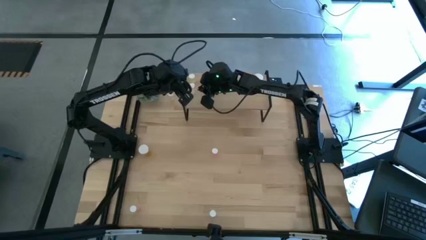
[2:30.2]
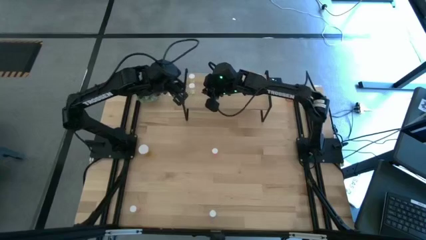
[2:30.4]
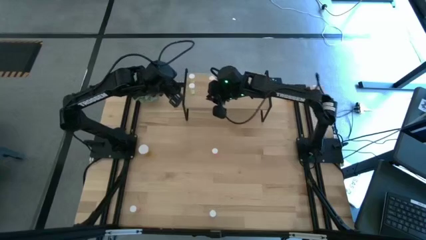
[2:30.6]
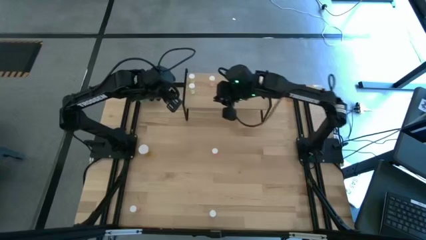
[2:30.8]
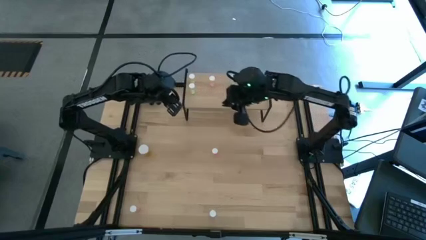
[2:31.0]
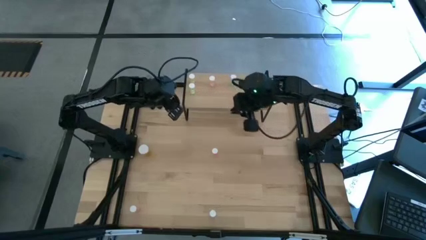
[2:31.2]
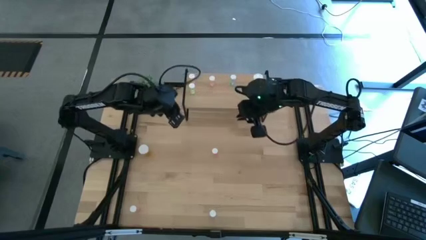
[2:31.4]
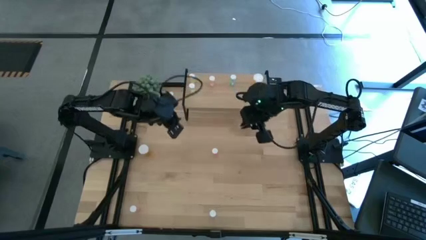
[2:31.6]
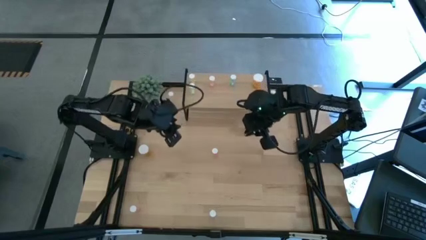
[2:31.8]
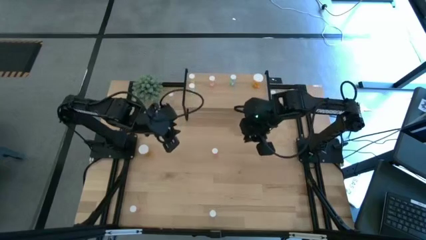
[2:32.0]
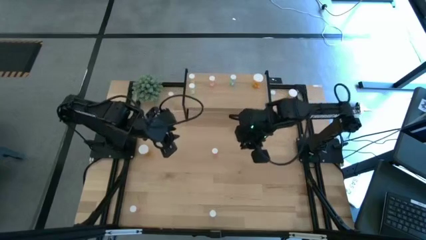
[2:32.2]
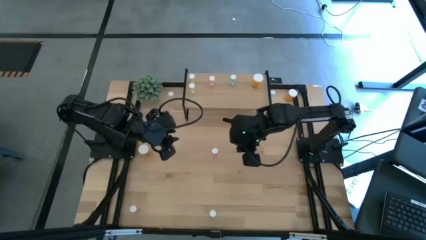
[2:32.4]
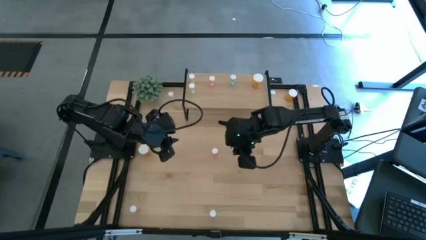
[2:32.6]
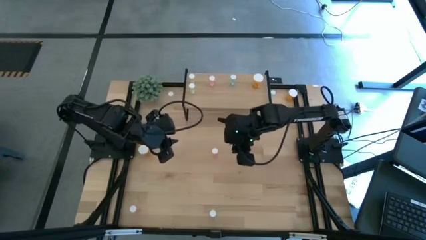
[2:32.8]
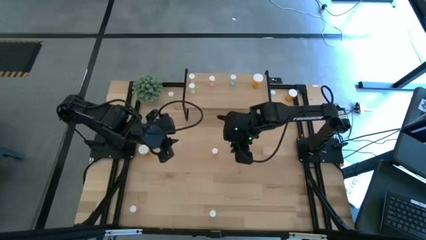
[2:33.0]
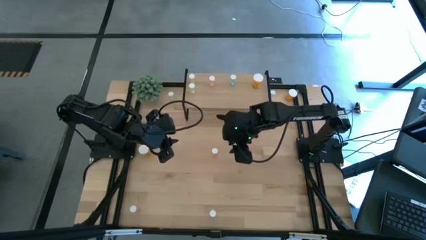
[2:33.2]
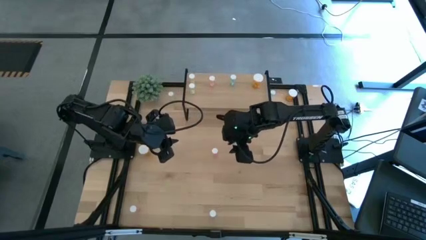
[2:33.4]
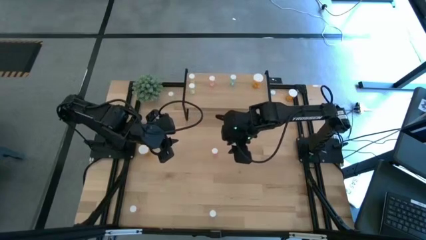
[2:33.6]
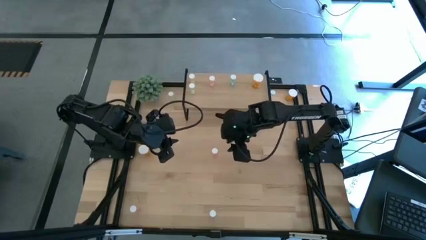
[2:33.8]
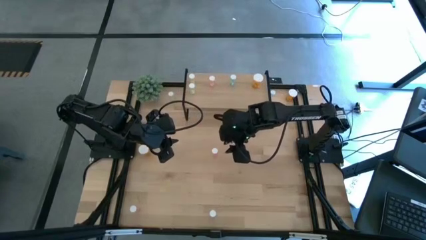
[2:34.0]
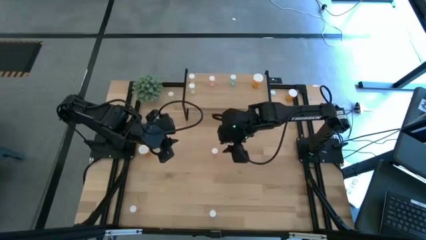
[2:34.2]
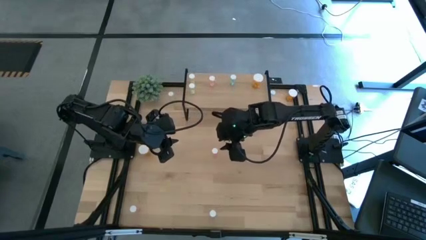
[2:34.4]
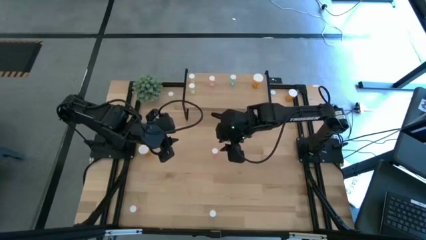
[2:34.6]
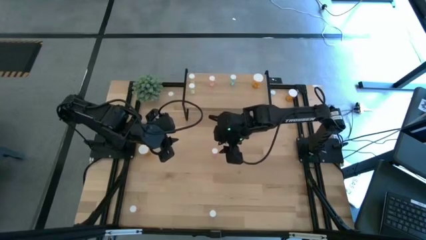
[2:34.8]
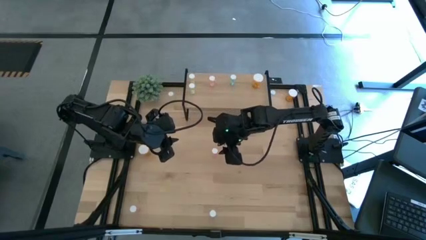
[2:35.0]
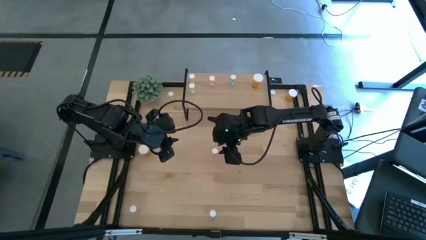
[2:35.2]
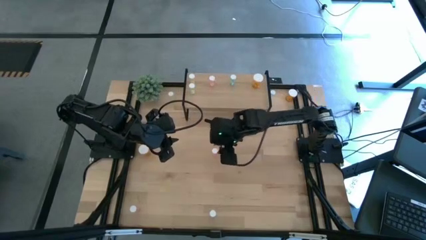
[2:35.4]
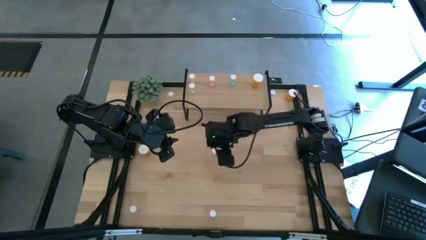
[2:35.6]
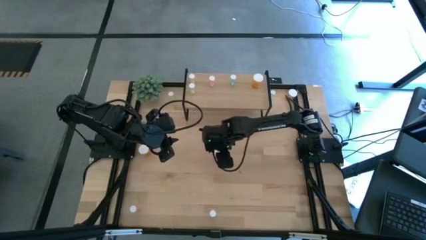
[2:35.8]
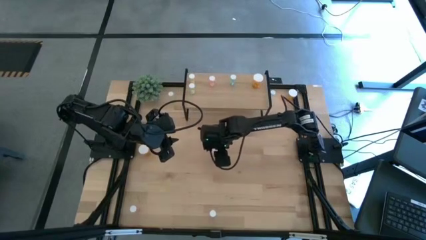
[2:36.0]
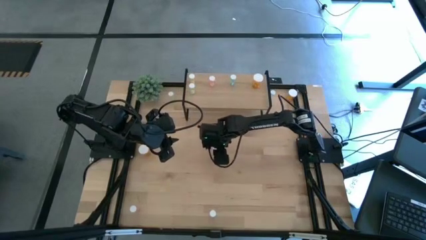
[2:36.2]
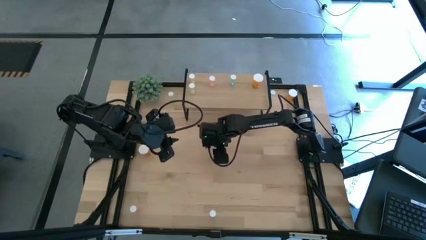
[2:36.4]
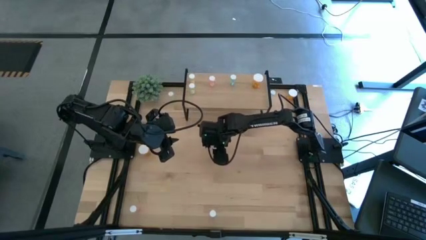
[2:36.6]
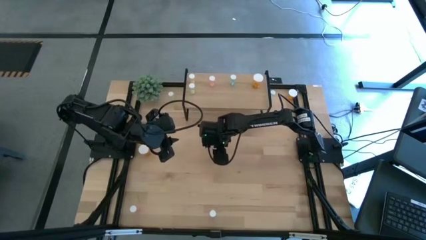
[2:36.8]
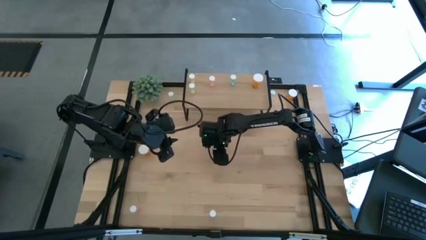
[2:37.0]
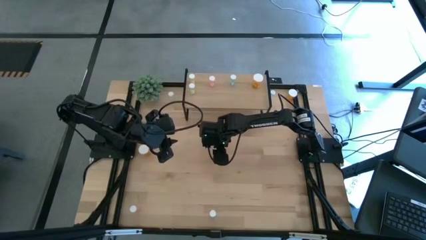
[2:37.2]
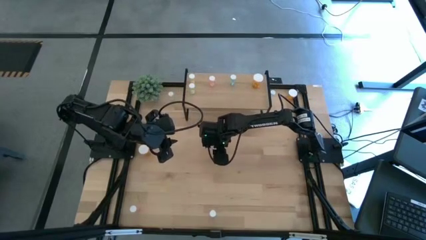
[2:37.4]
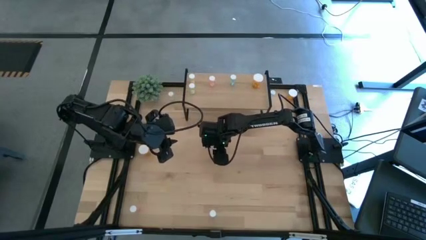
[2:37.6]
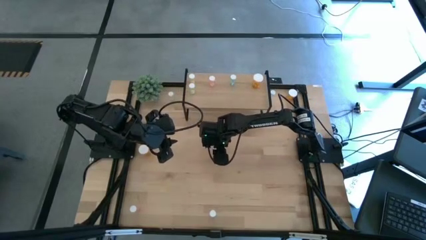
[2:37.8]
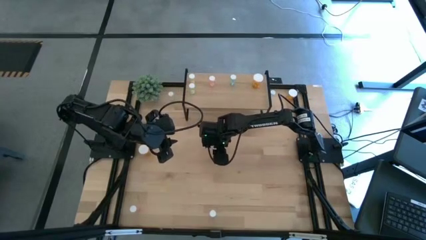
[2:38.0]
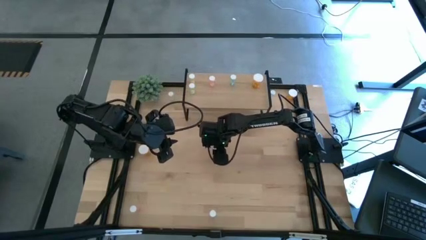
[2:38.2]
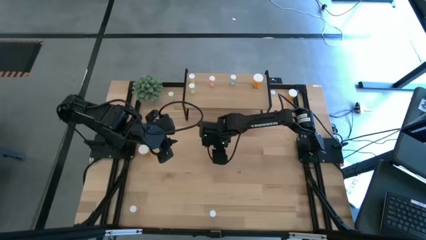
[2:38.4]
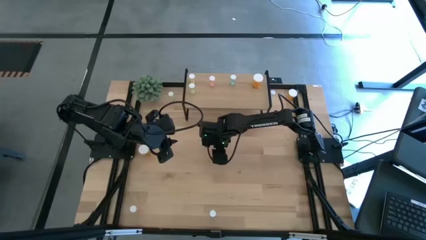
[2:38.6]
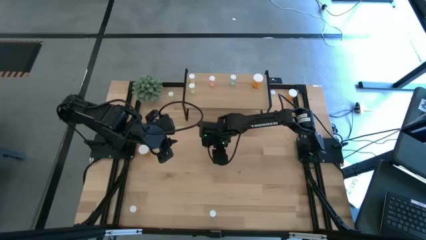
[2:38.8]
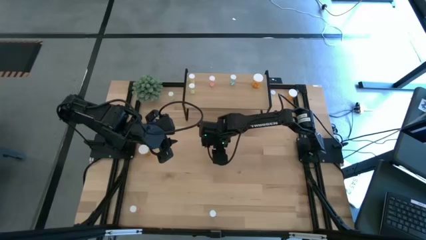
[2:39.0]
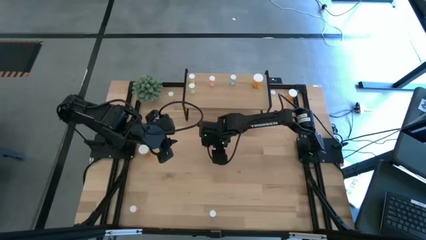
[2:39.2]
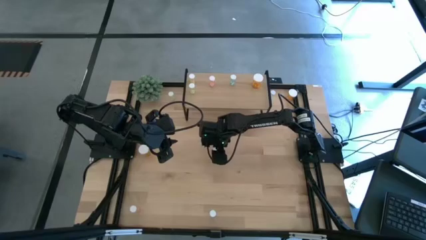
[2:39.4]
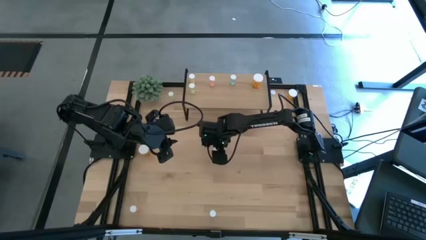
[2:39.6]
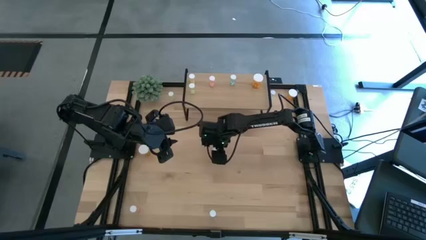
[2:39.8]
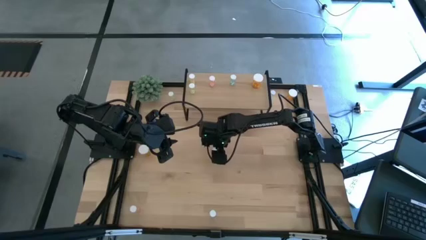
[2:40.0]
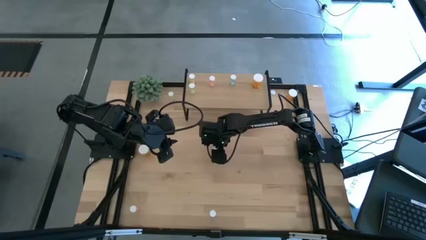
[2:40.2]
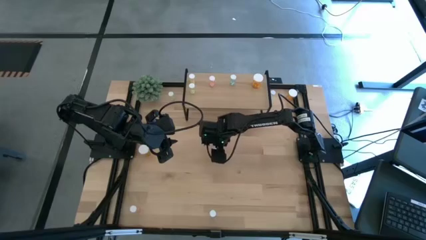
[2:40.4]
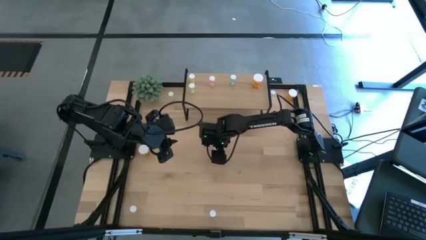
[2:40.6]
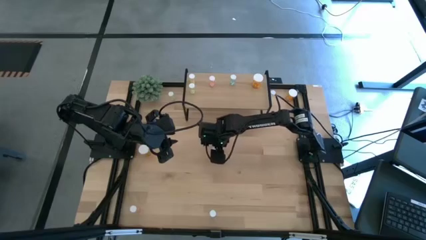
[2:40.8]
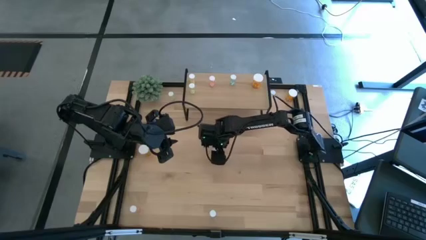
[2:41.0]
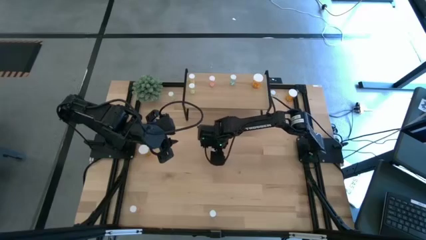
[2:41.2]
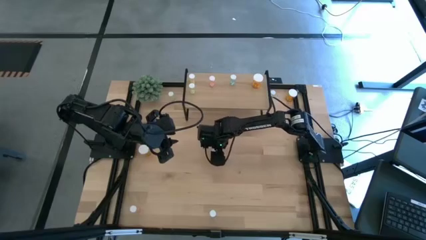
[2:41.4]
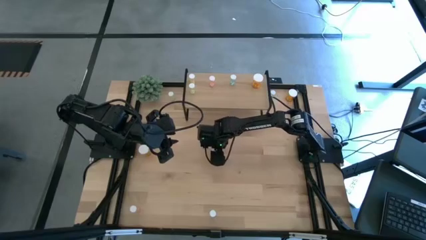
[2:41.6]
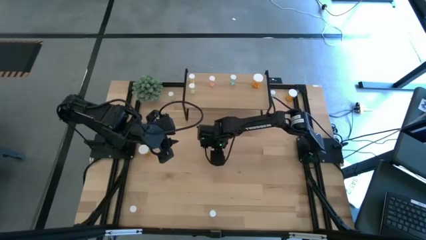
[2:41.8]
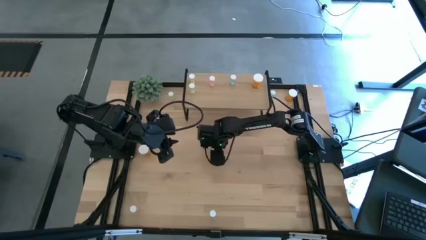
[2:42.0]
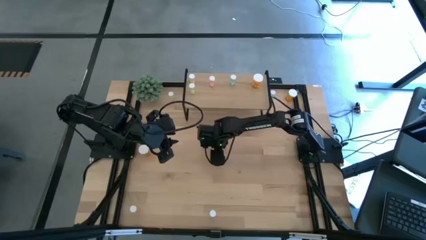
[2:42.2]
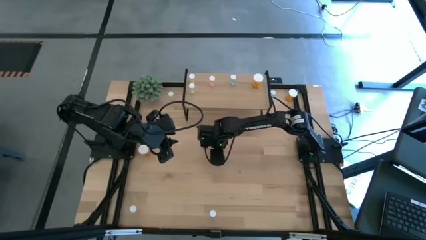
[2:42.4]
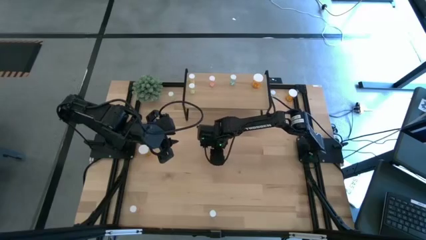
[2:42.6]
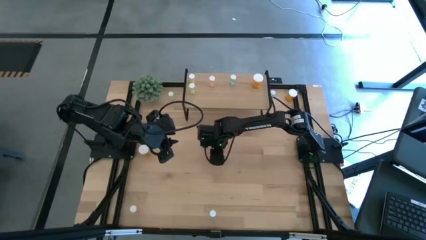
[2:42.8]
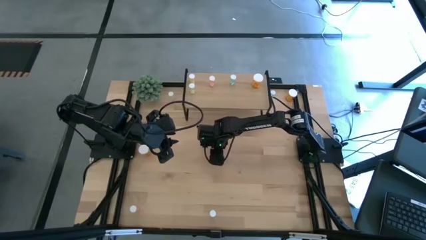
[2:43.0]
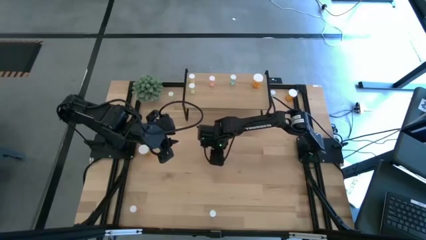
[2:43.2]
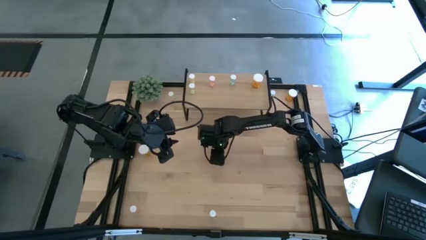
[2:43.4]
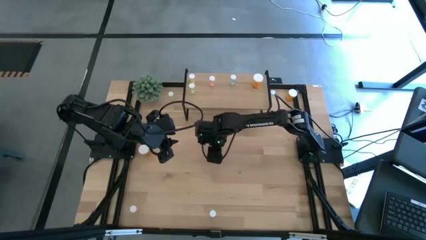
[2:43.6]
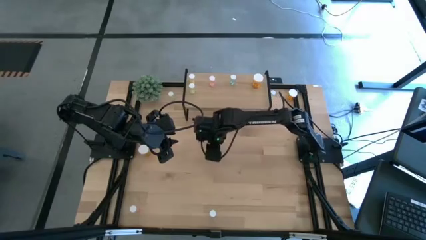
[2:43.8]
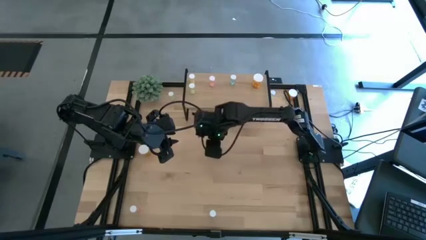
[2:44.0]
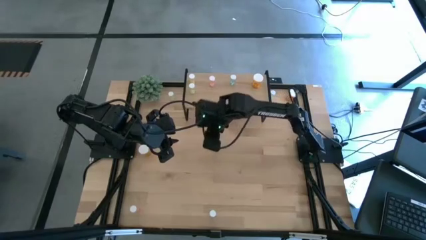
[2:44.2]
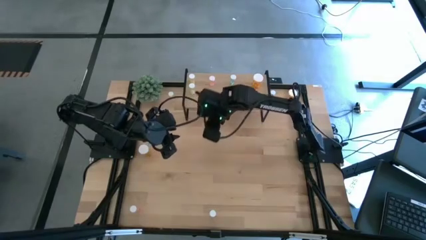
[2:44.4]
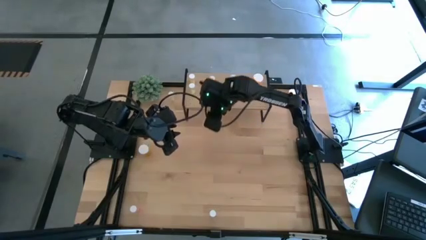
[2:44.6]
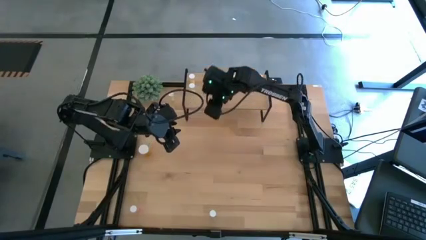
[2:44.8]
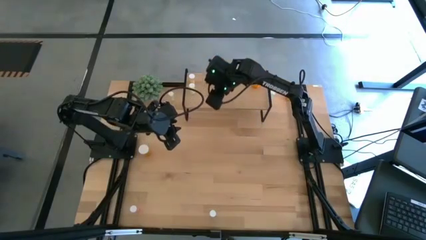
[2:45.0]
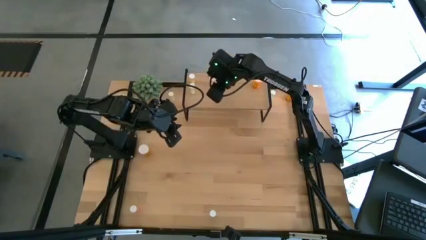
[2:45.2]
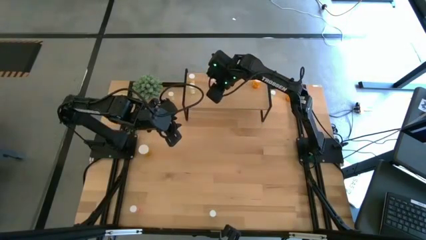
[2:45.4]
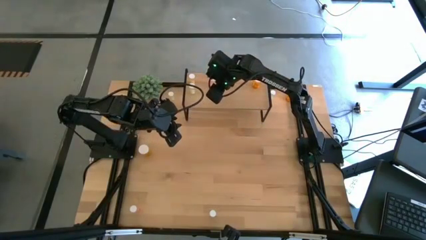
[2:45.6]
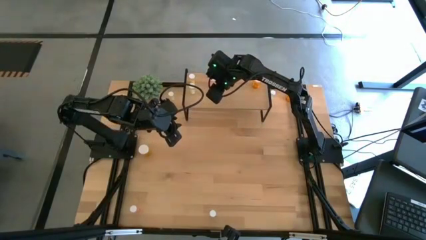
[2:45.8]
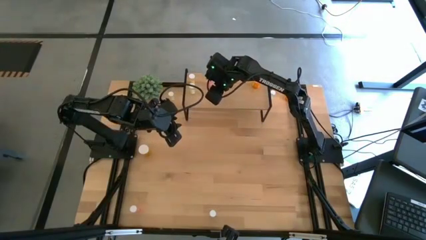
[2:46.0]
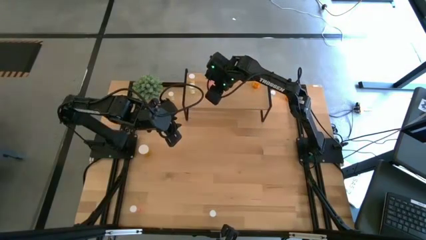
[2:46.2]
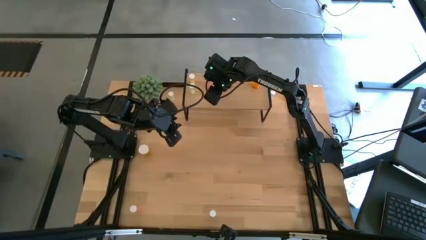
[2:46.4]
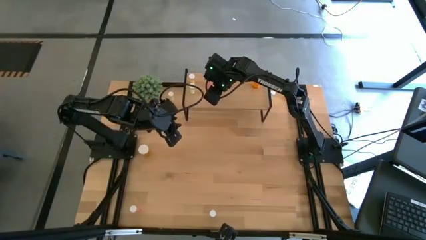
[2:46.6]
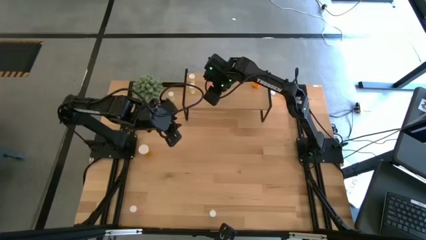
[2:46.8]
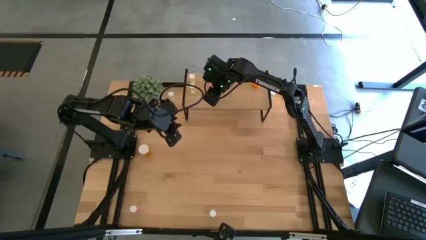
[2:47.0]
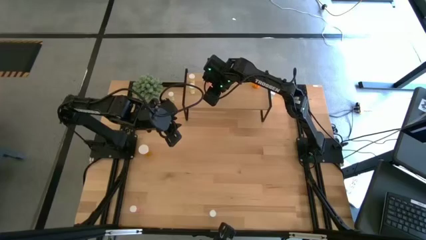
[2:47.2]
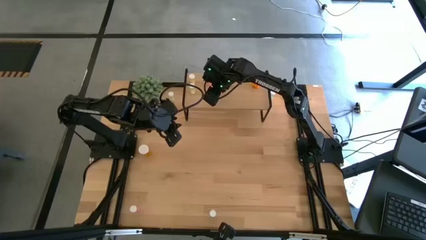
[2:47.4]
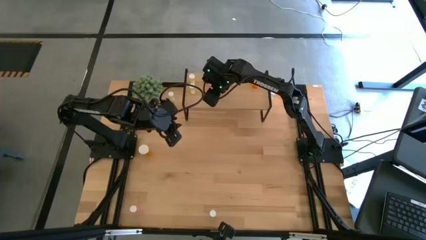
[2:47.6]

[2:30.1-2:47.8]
Task: Pick and place medicine bottles onto shelf by color
Put the top pink pill bottle on the shelf aligned with the other pink pill bottle
